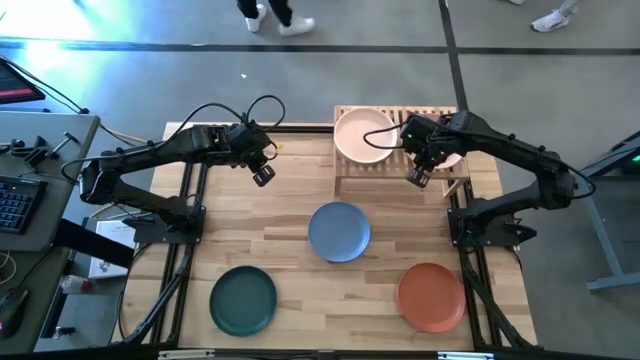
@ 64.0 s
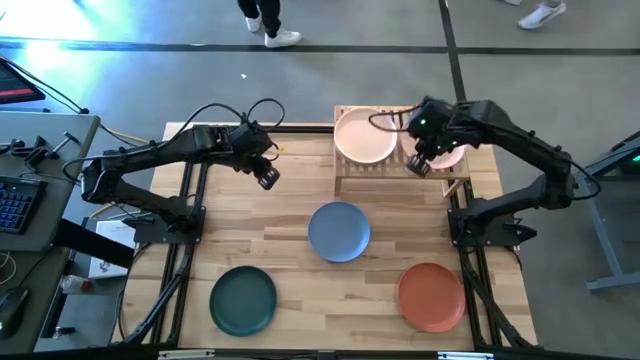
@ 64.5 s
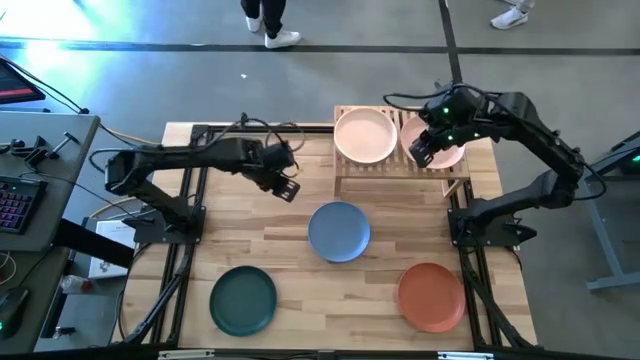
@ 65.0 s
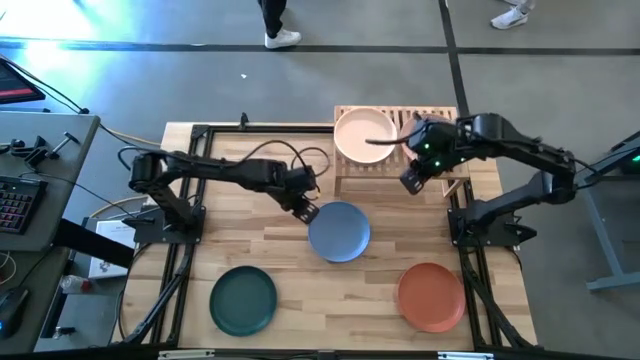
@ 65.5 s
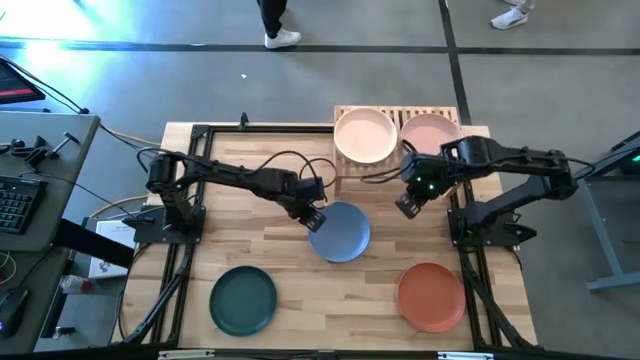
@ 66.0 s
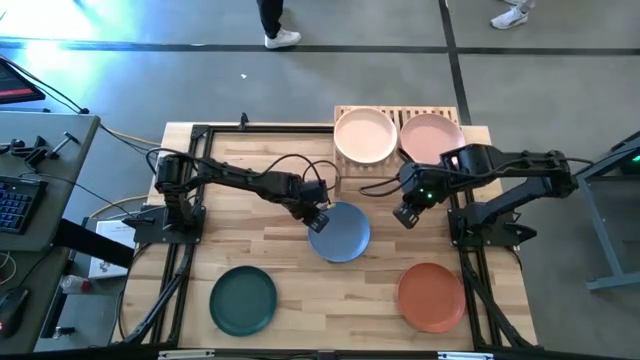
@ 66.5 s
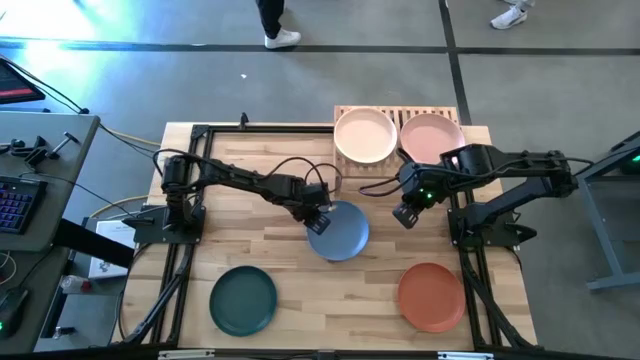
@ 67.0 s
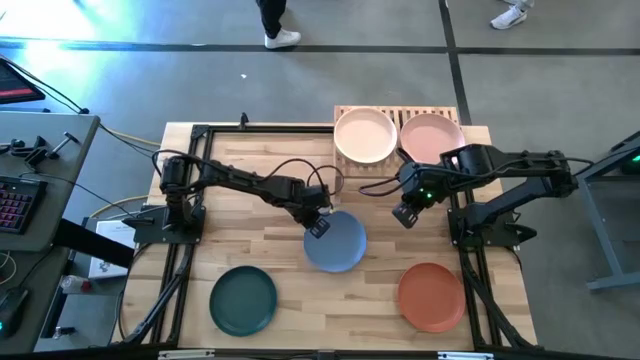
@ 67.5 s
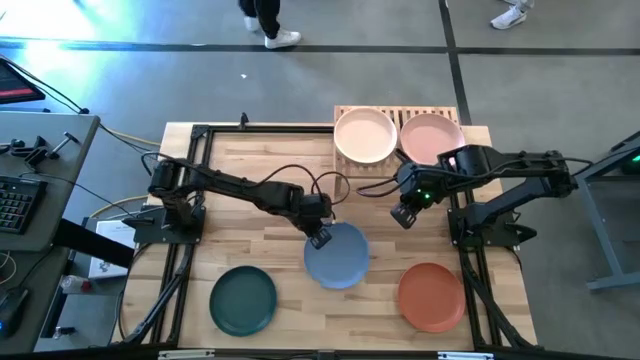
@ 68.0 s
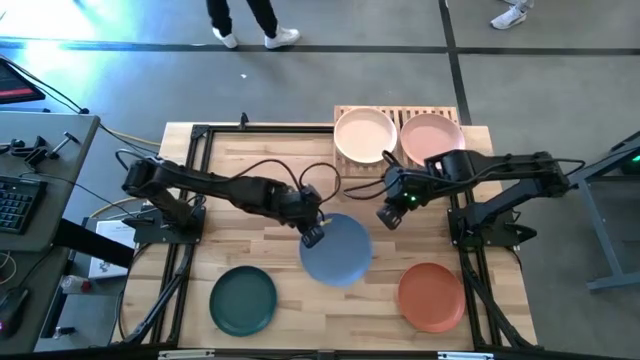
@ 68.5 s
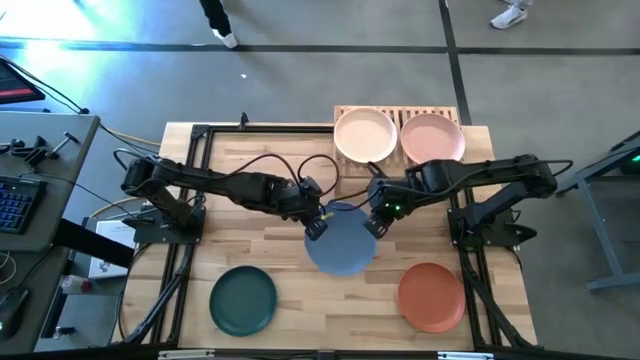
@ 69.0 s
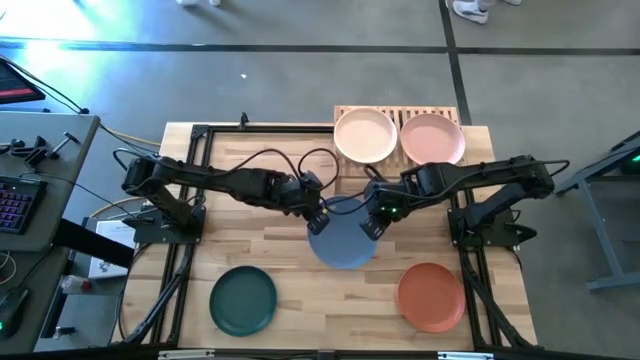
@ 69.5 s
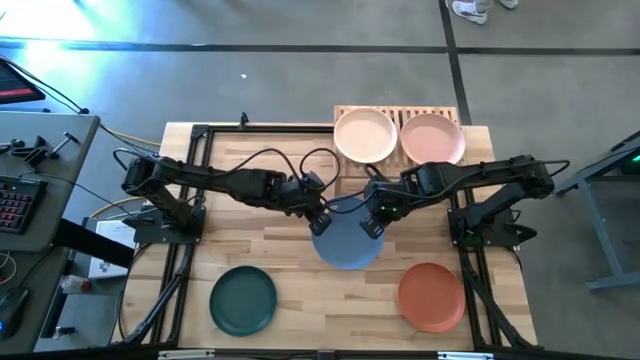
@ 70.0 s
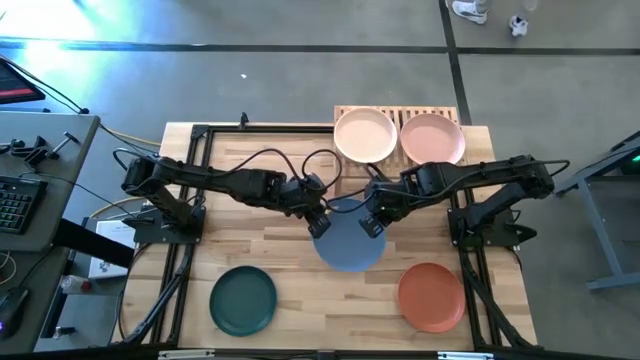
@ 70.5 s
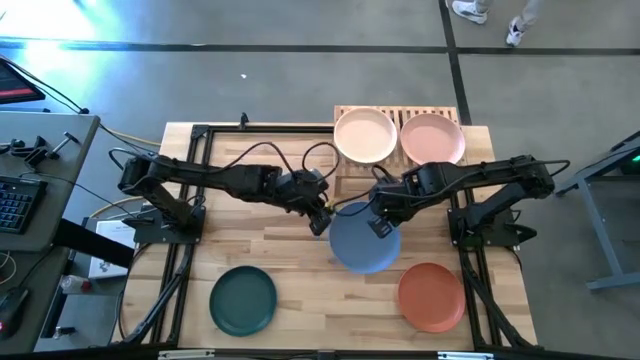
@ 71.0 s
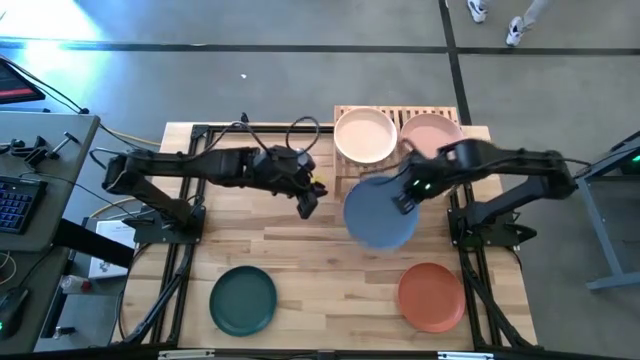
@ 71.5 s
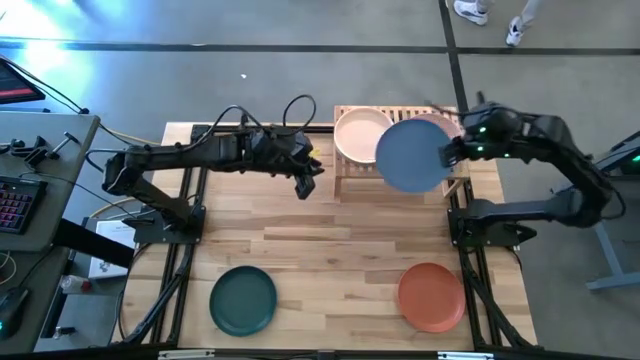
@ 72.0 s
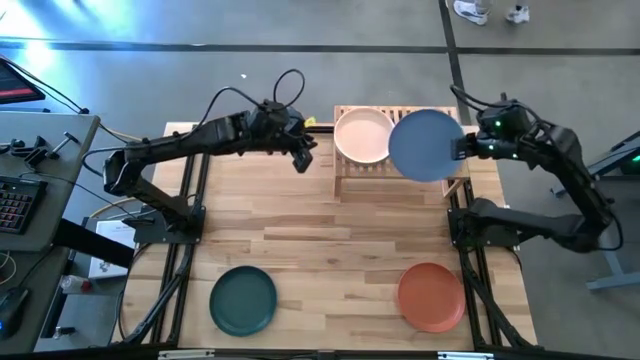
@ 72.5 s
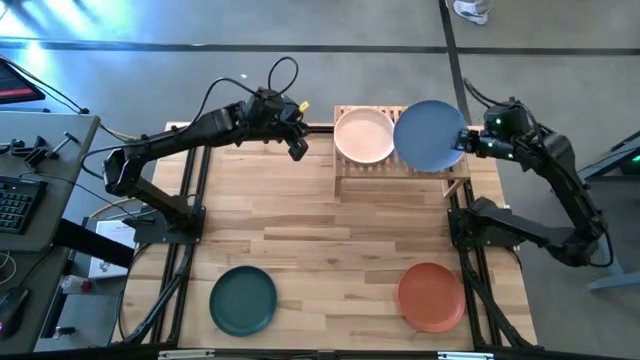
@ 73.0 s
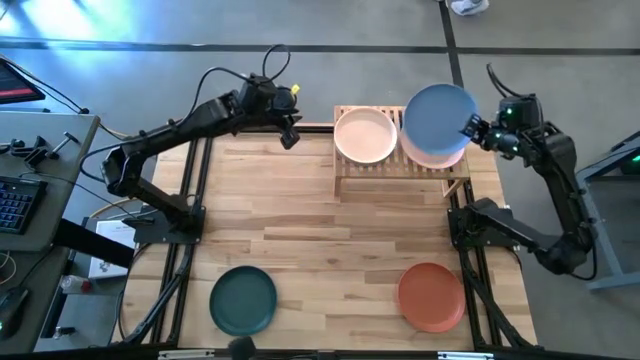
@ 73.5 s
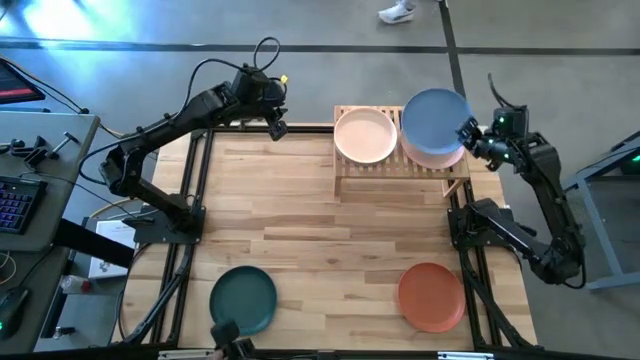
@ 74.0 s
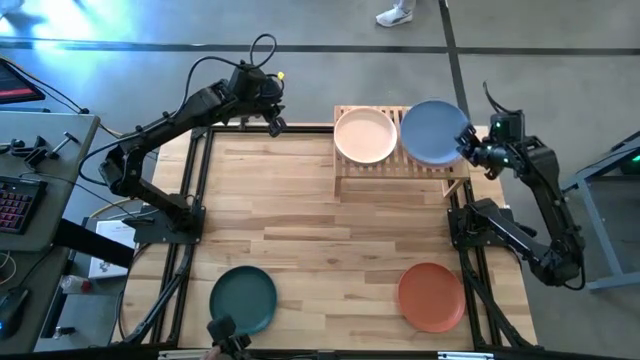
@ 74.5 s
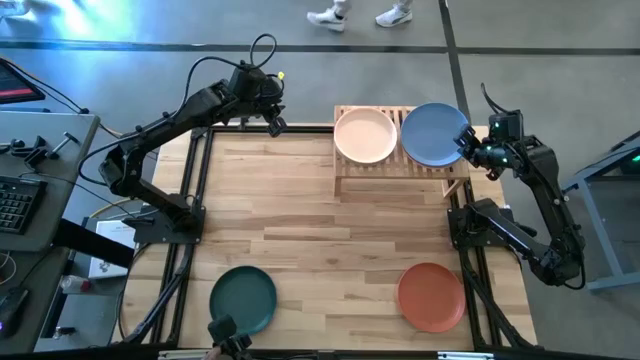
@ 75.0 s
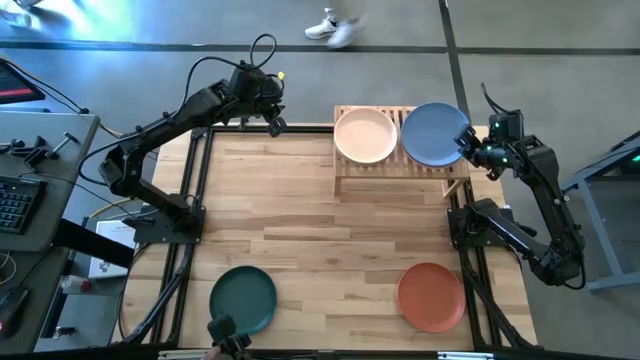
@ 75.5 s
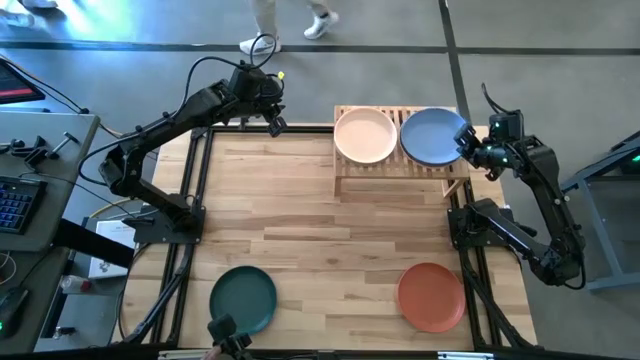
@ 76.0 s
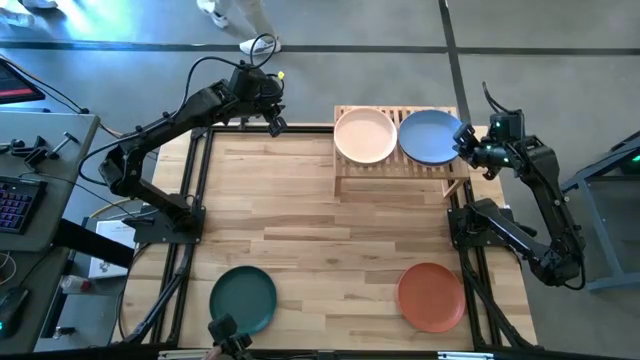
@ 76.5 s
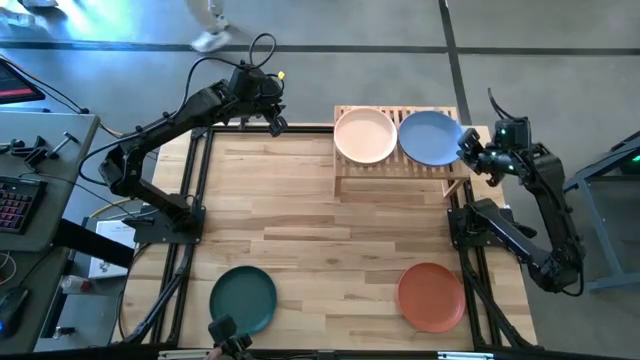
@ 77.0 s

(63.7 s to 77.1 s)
Task: Place and stack plates onto a shelf
Stack the blue plate on top of the pink plate on the shelf

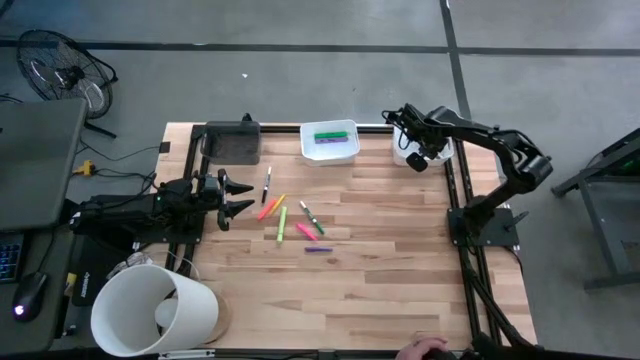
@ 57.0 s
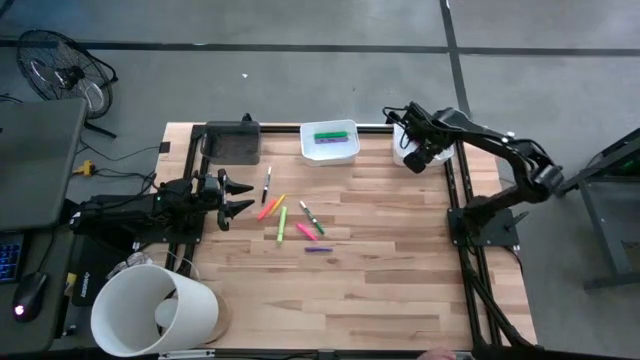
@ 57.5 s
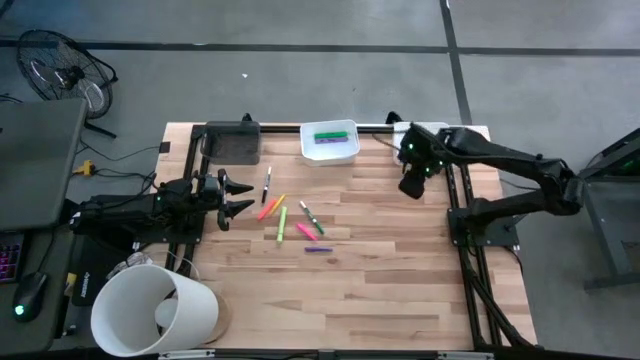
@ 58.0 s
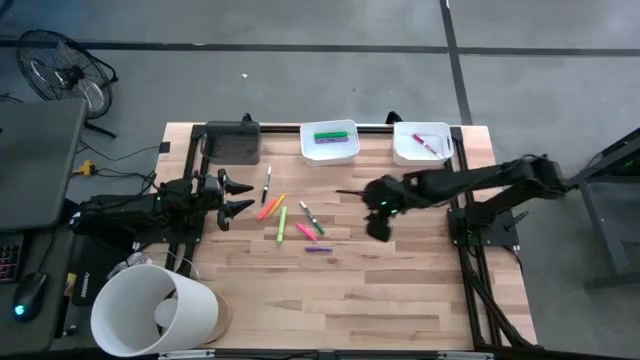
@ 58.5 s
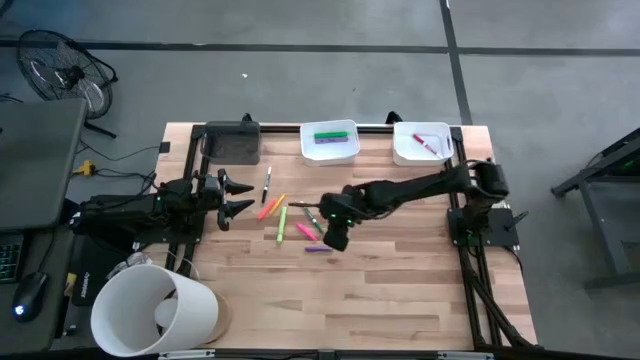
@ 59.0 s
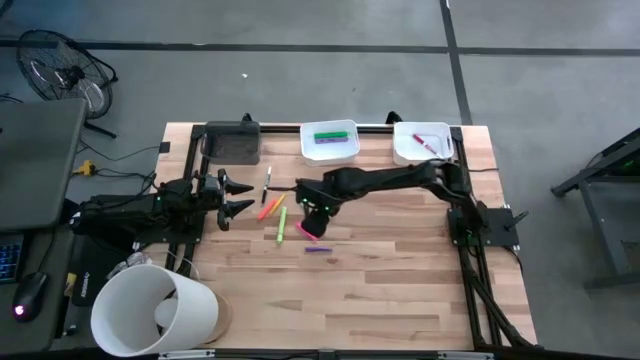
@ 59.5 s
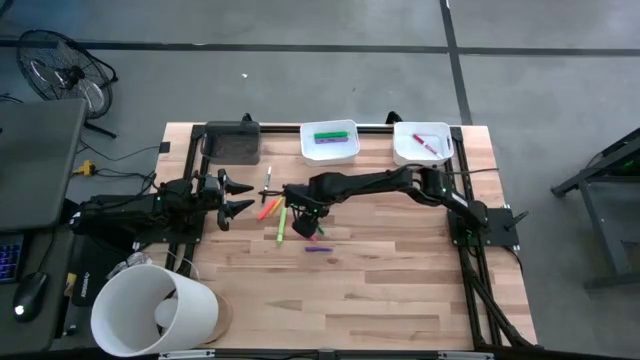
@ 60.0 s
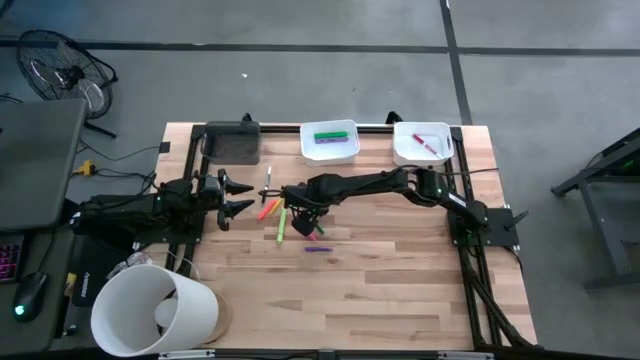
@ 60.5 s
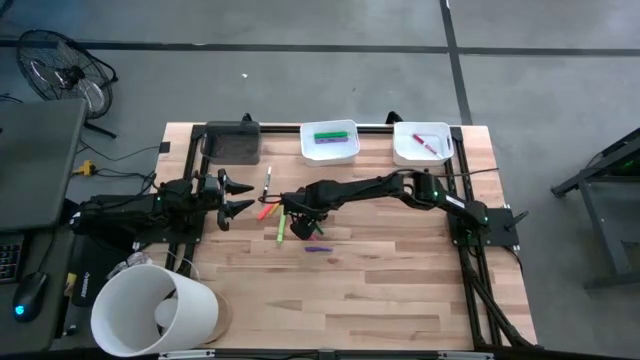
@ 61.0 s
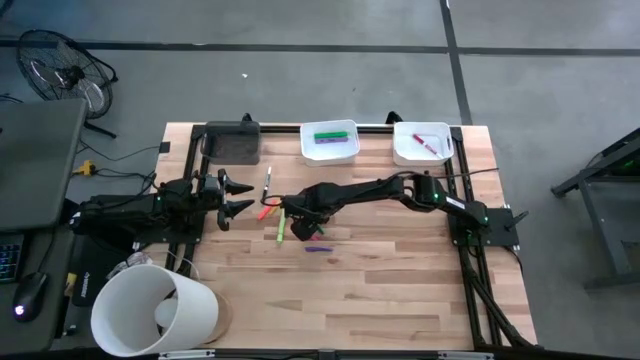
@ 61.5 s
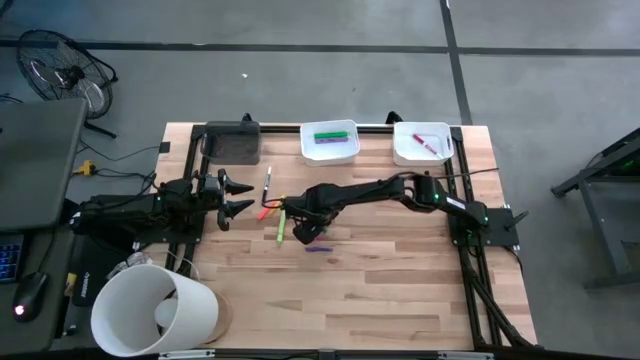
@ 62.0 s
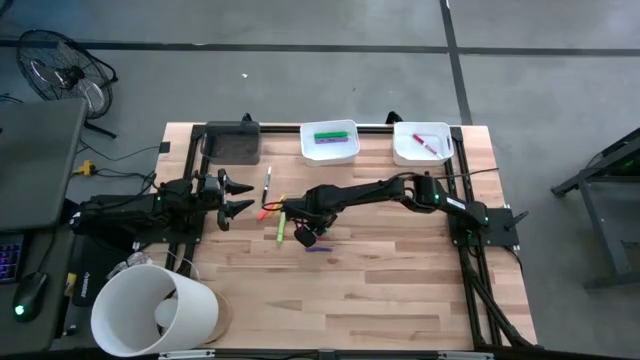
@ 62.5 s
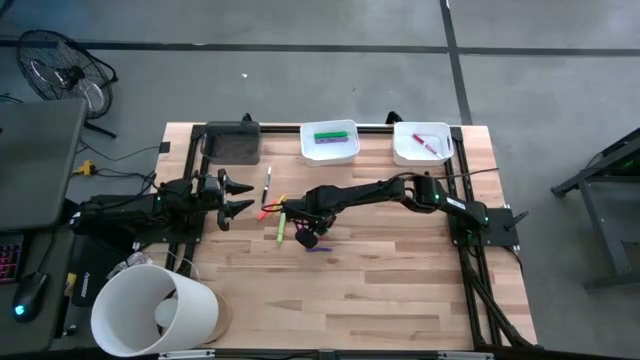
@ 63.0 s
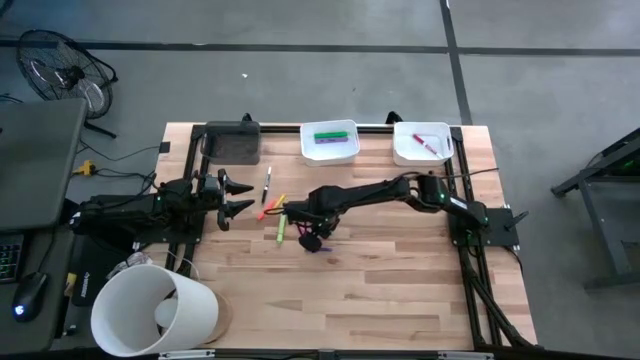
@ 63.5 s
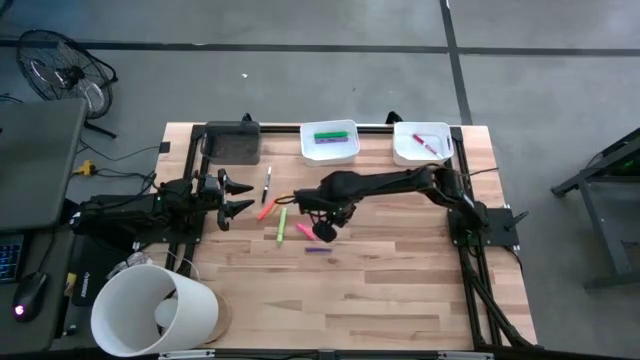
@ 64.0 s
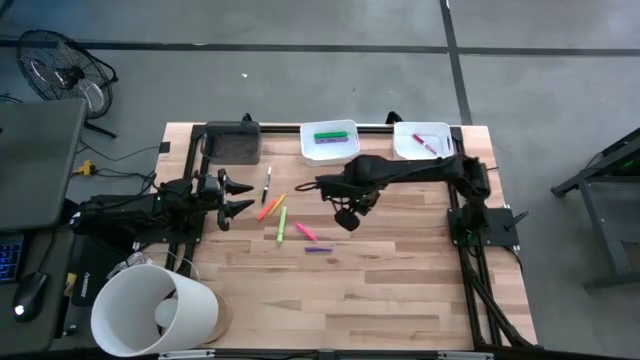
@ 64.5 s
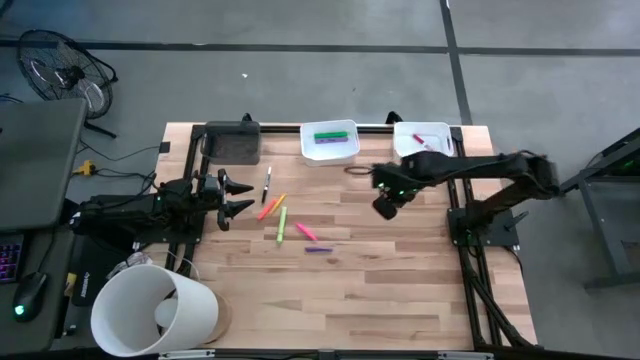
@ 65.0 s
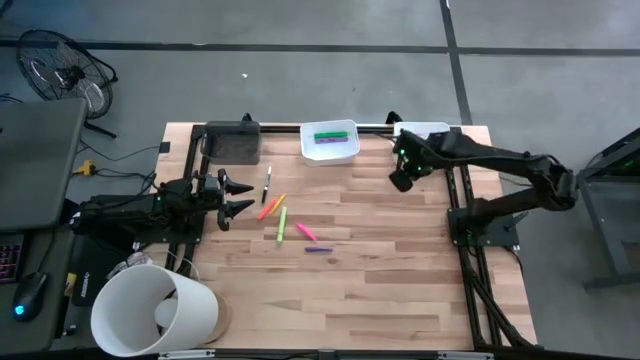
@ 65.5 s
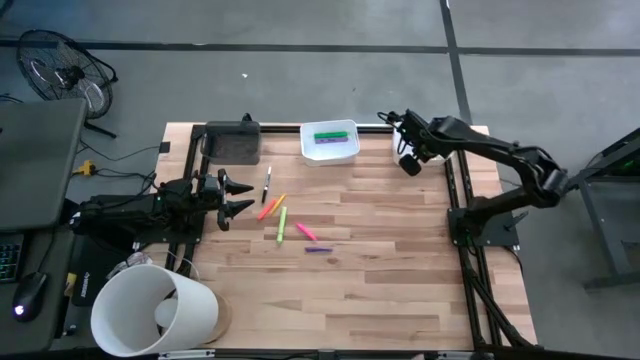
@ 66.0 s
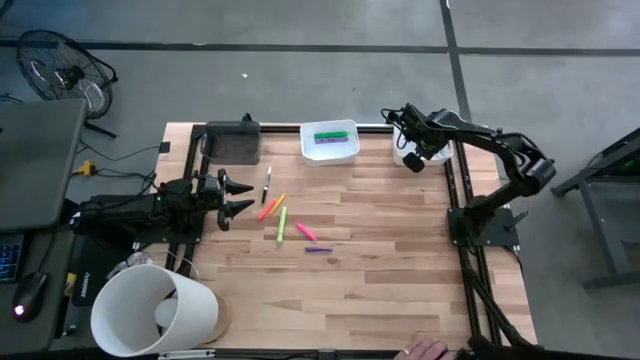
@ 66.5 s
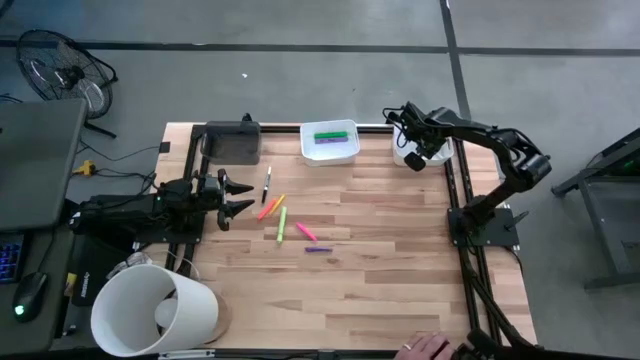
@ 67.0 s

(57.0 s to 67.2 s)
Task: Pick & Place Markers
Put the green marker pen into the right white bin
